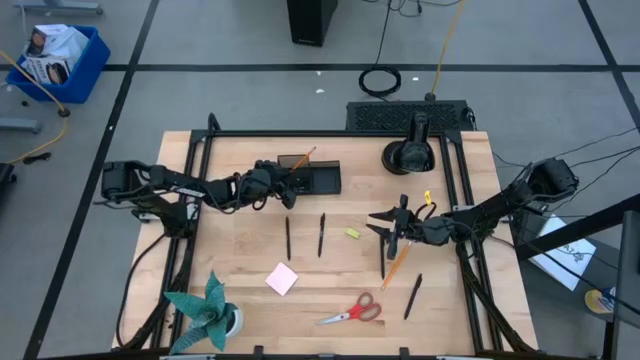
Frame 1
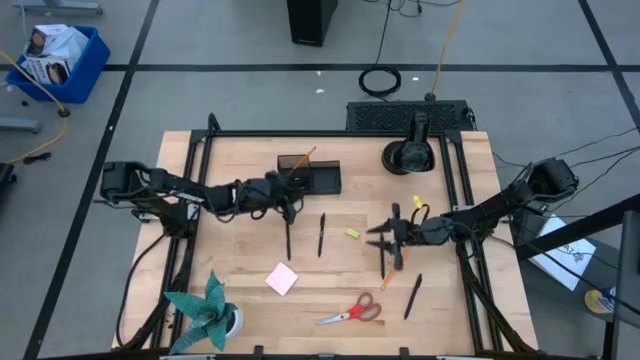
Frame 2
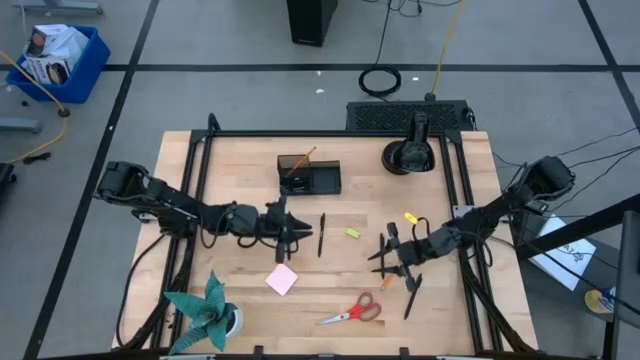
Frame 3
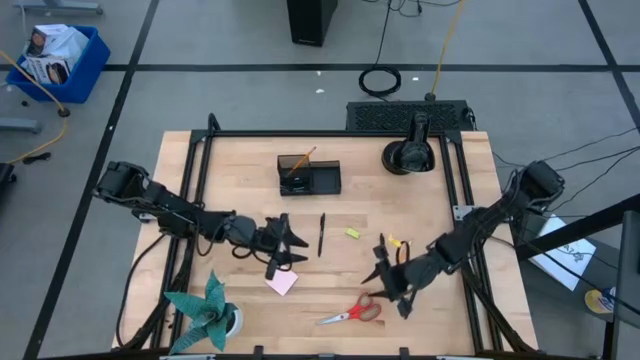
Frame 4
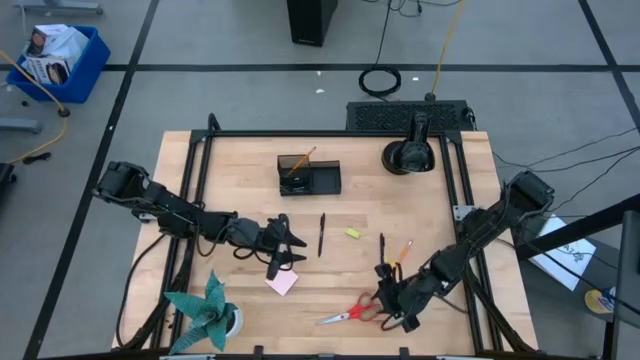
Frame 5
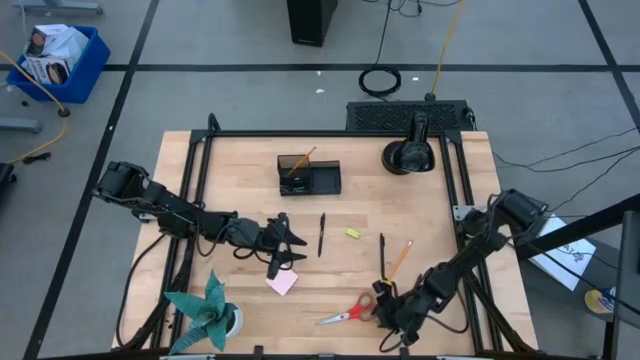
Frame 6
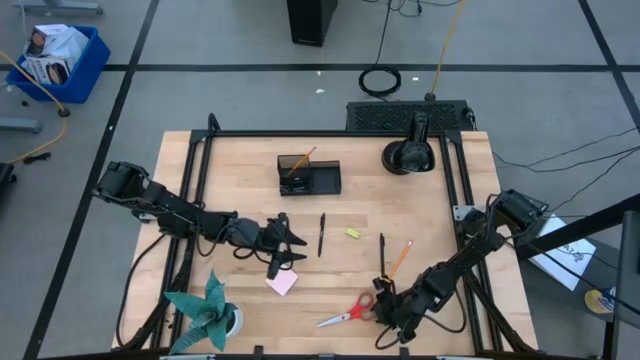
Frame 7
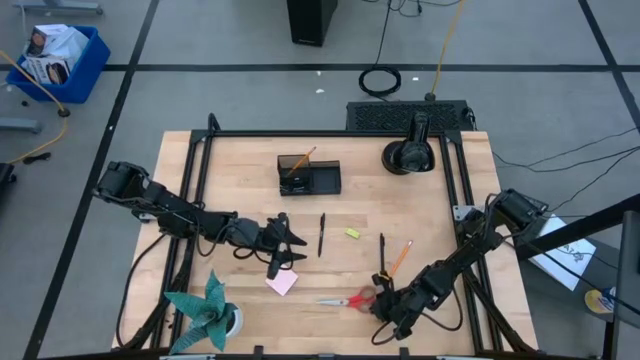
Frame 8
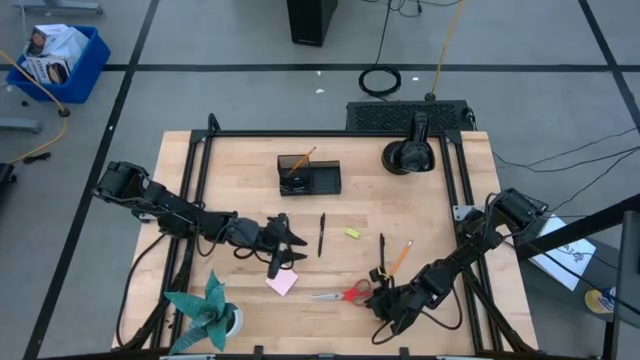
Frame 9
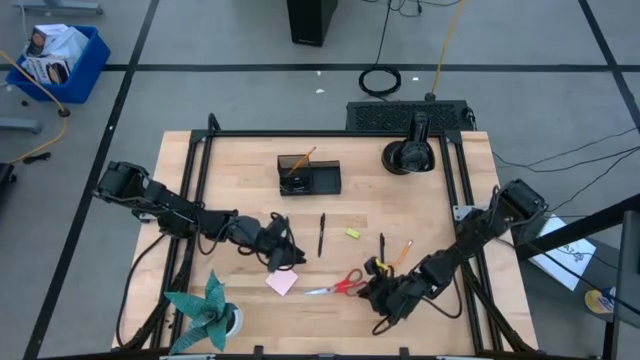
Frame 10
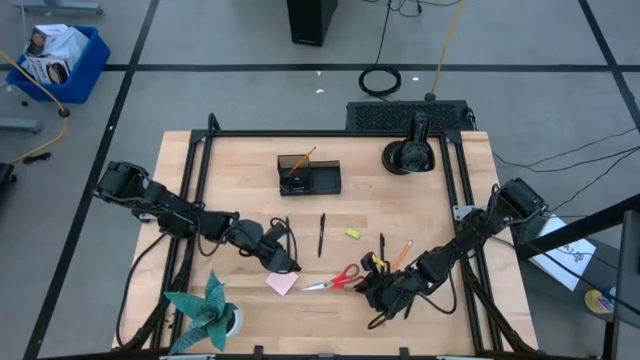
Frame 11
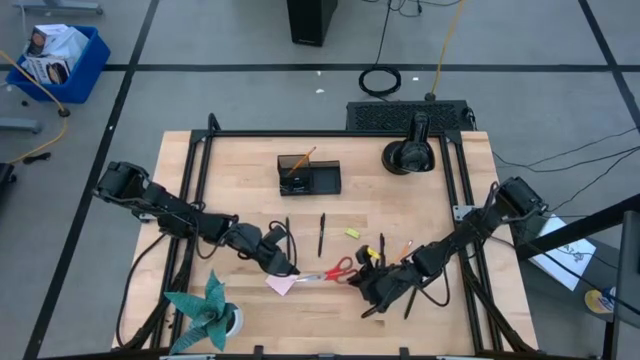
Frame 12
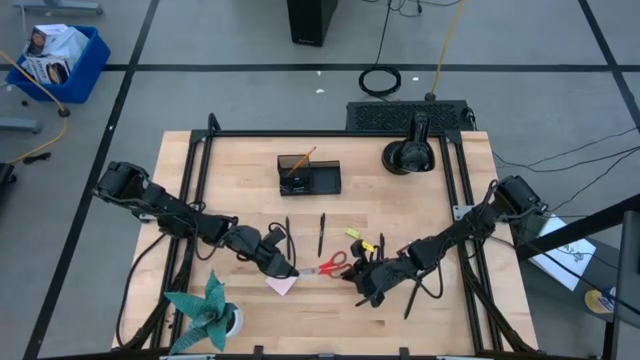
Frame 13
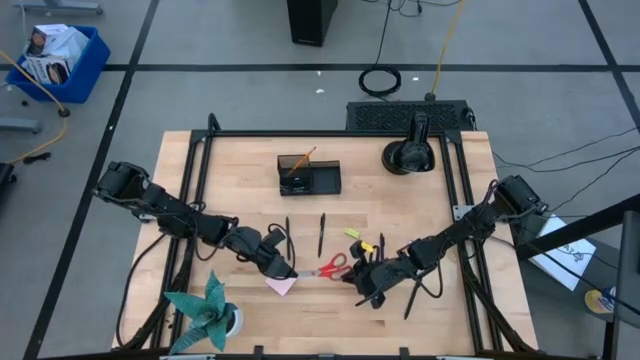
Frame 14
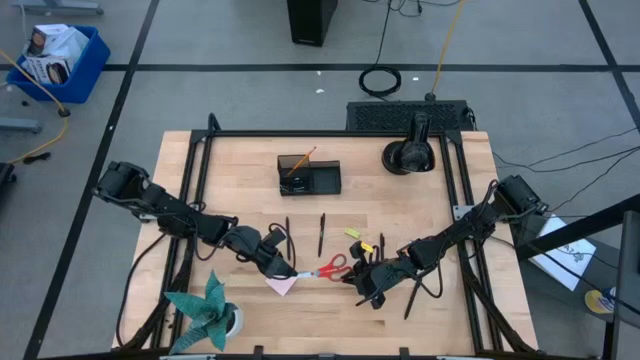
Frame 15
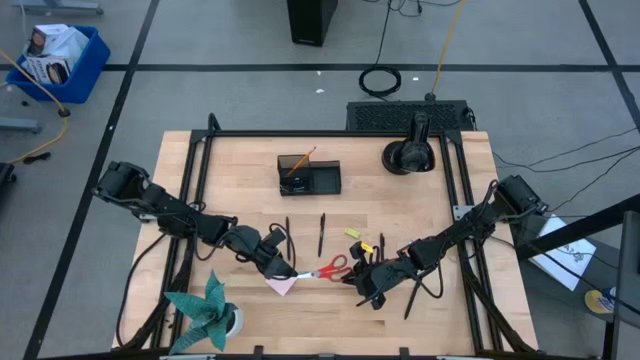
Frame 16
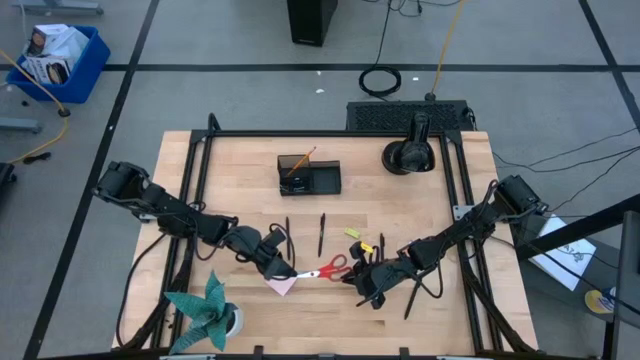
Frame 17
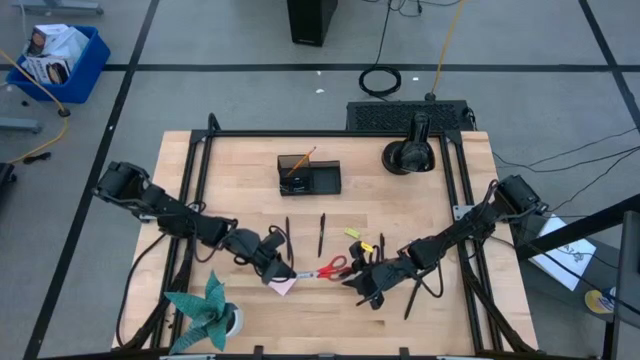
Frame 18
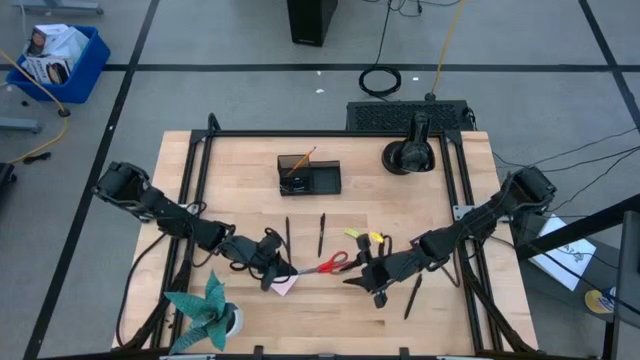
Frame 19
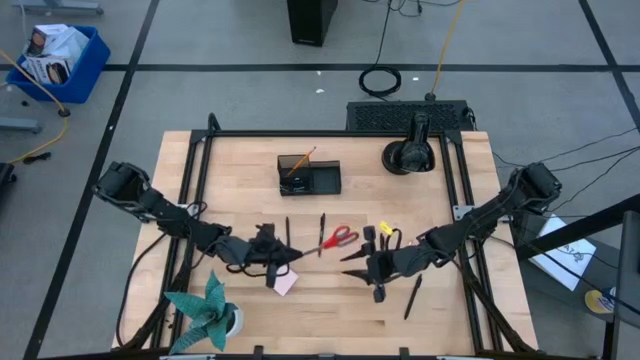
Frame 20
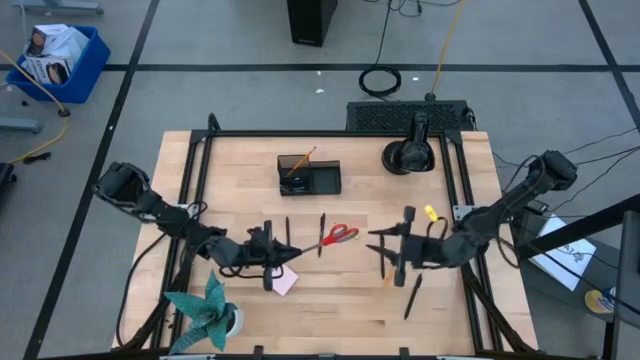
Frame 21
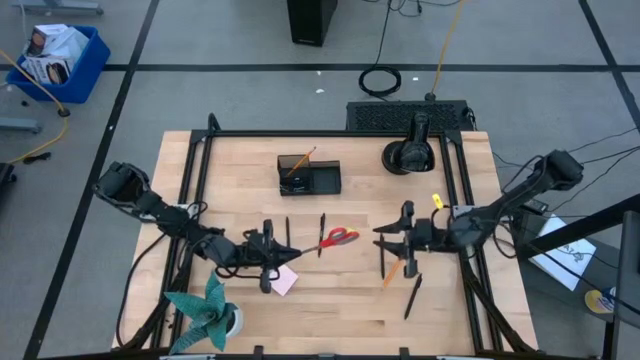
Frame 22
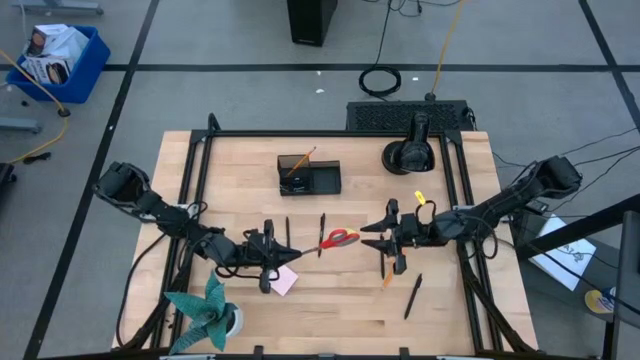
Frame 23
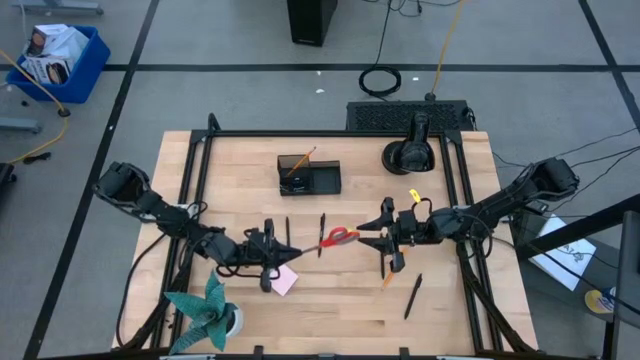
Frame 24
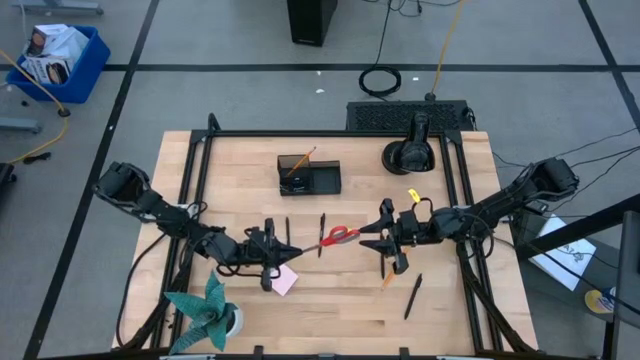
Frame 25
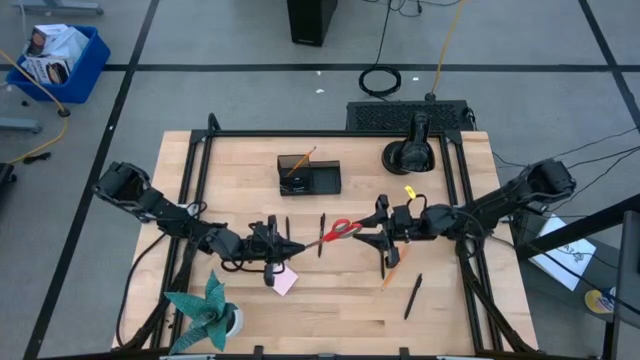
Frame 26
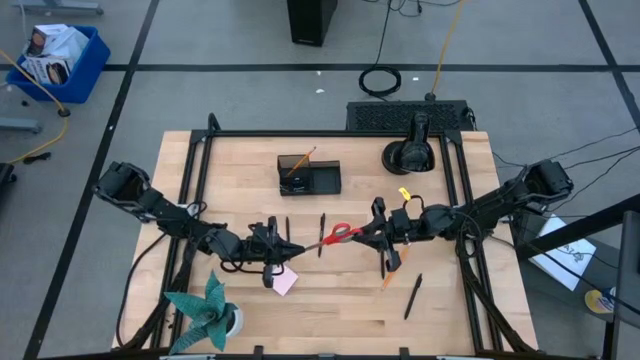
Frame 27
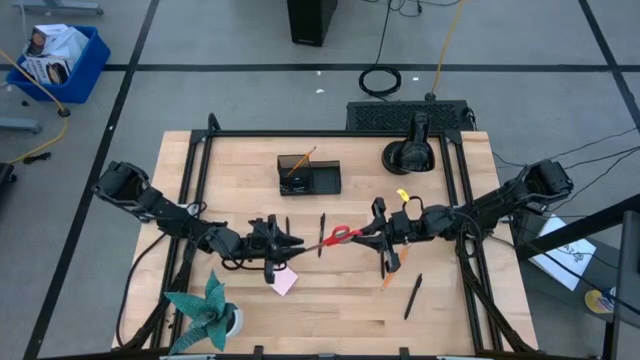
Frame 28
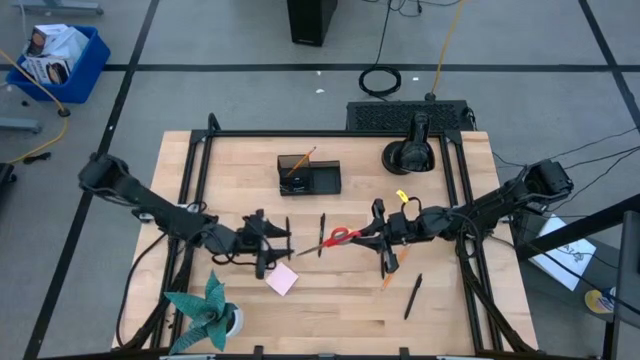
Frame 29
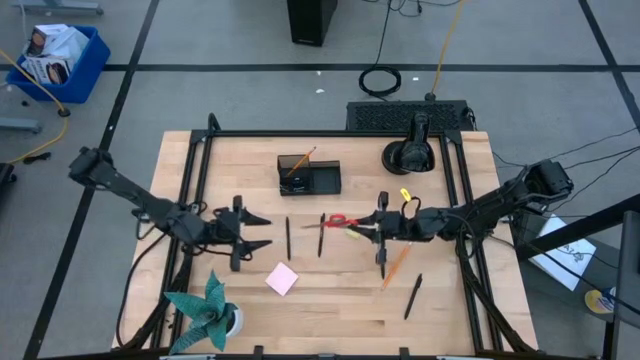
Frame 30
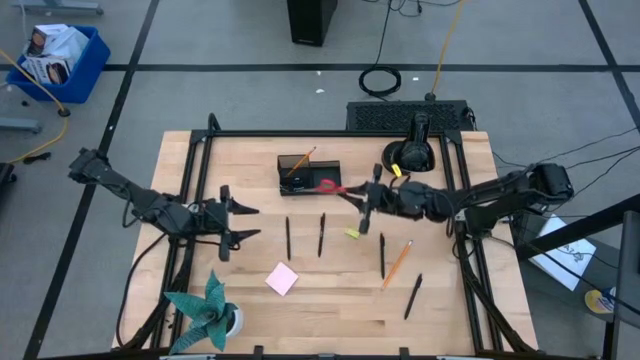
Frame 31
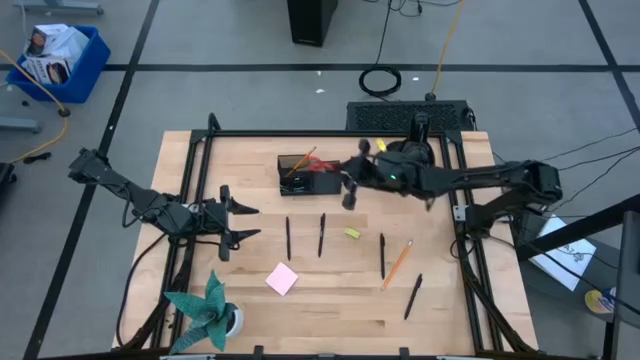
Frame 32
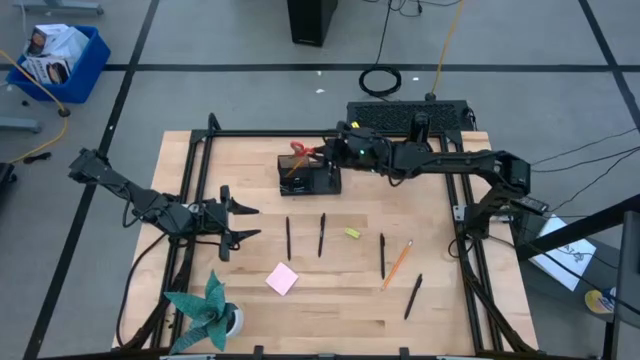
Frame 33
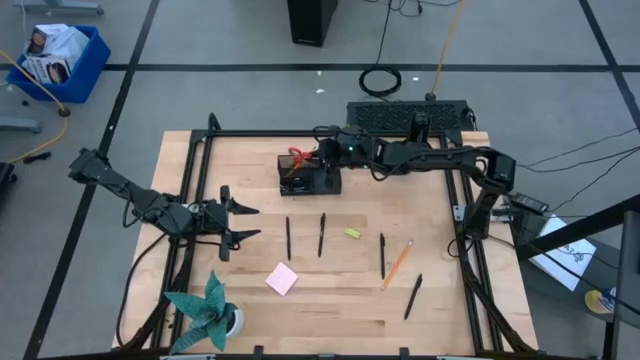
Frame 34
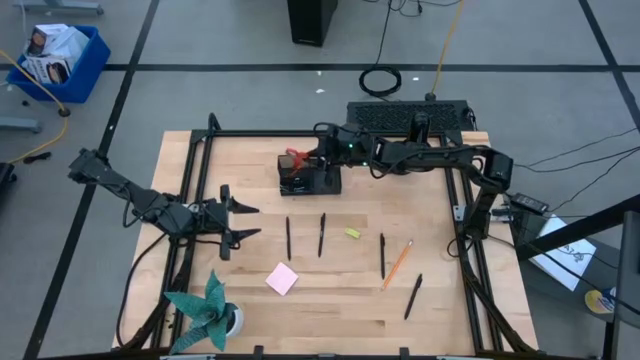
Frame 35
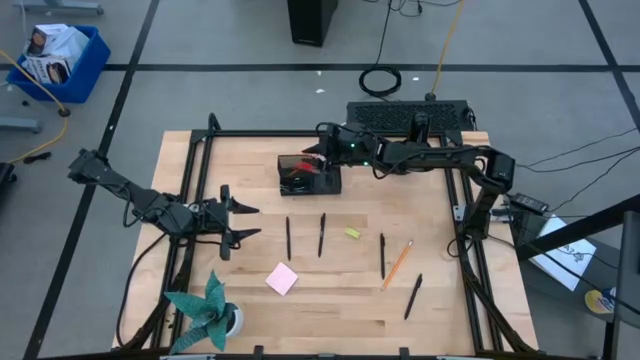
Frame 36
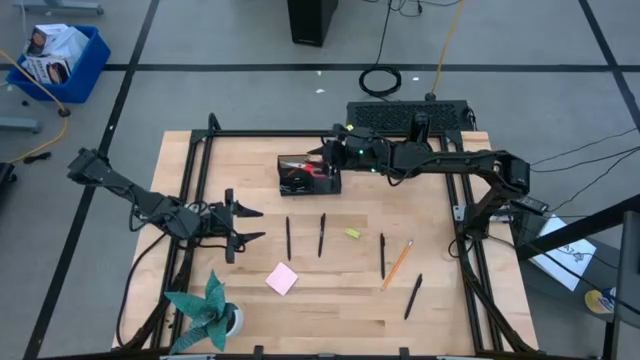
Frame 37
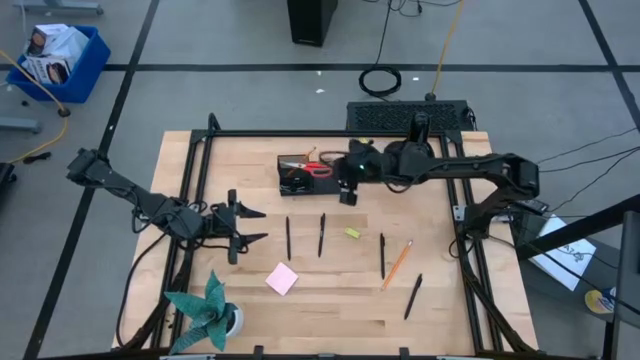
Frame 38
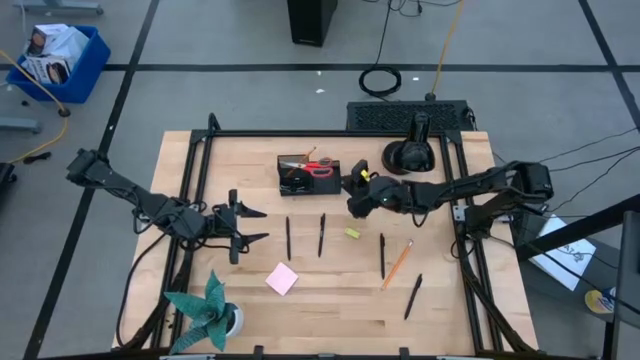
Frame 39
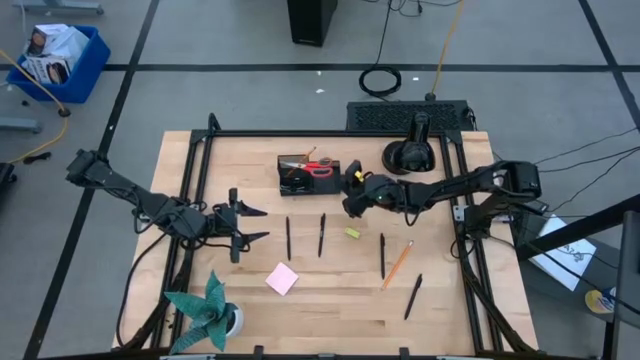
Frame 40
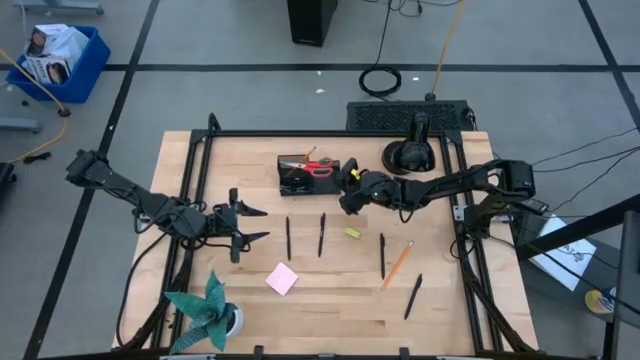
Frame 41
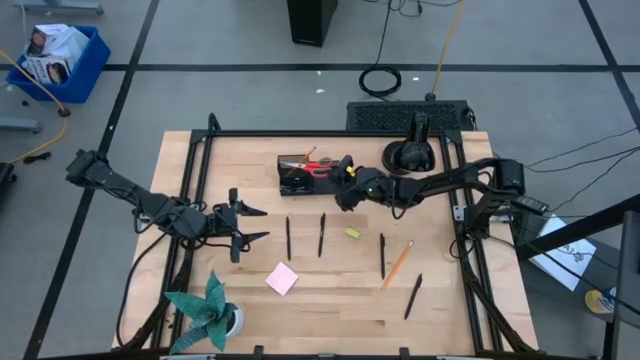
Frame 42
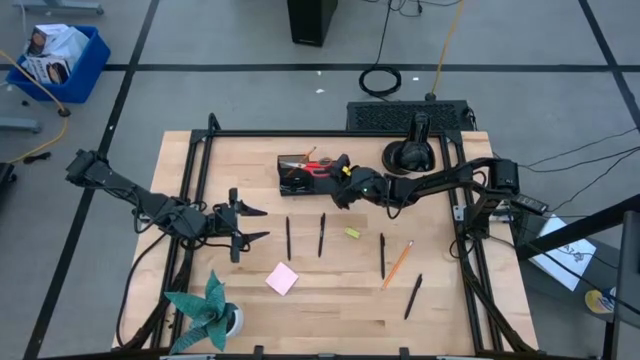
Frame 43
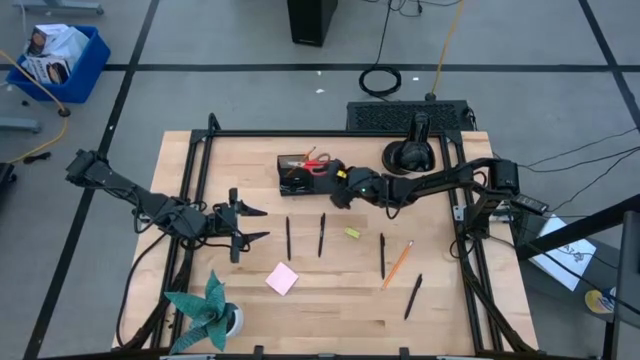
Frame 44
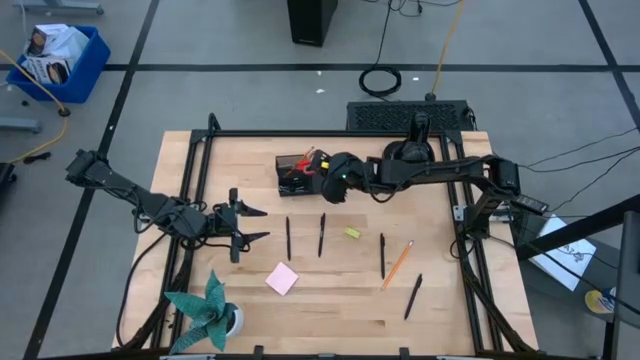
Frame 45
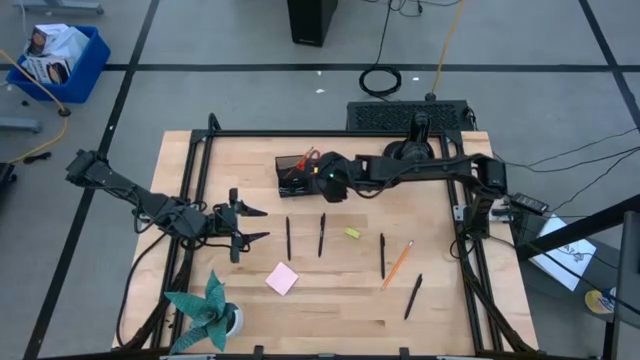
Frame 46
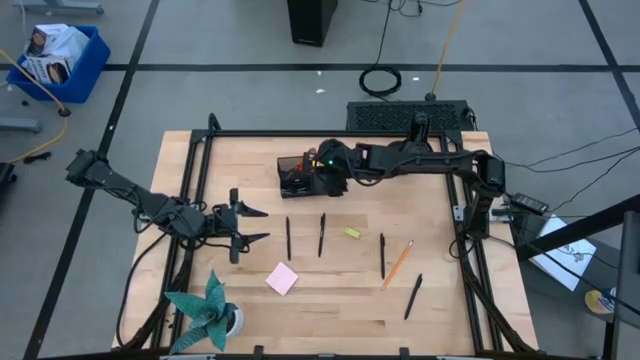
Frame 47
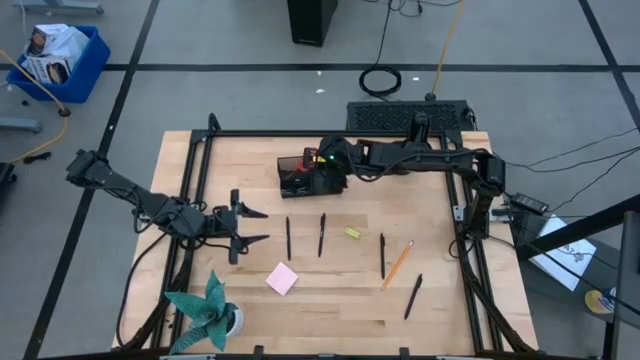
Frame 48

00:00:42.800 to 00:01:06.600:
Task: Pick and place office supplies into organizer
Put the red scissors into the black desk organizer
